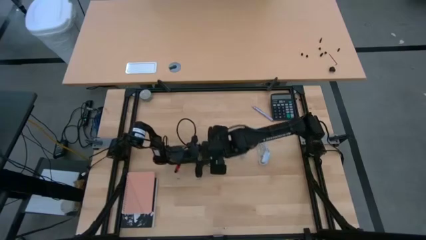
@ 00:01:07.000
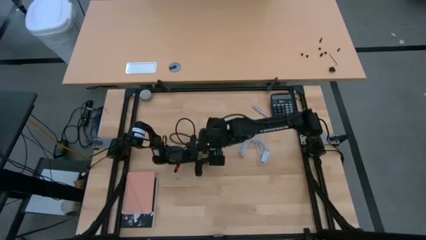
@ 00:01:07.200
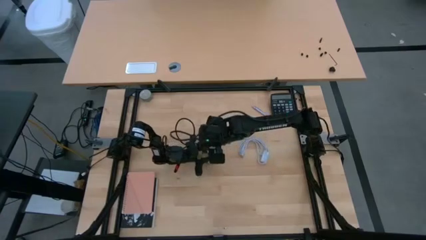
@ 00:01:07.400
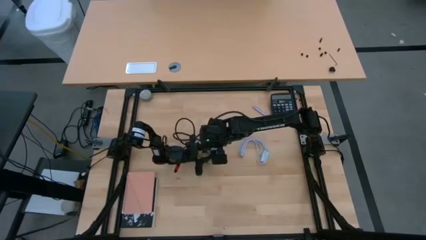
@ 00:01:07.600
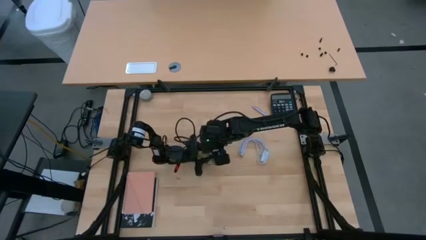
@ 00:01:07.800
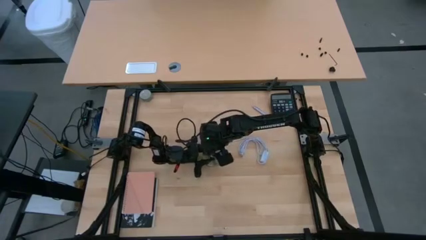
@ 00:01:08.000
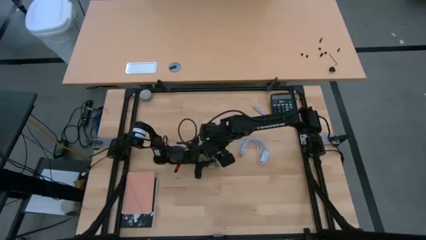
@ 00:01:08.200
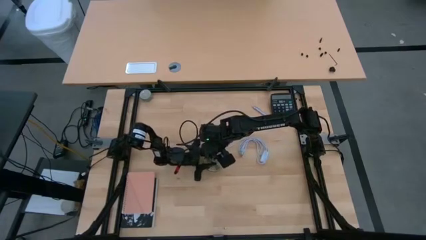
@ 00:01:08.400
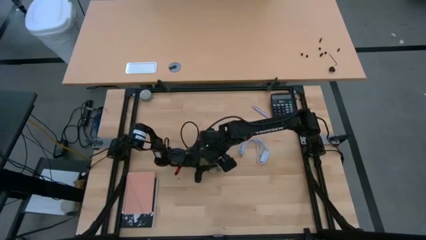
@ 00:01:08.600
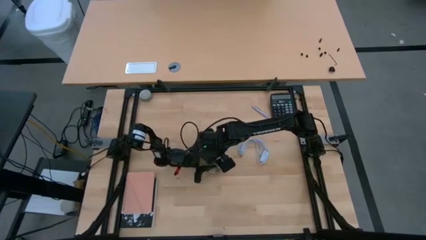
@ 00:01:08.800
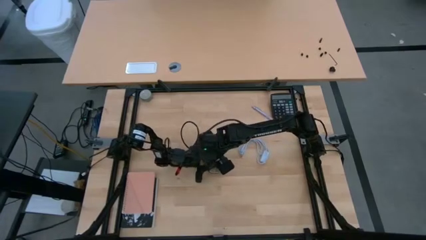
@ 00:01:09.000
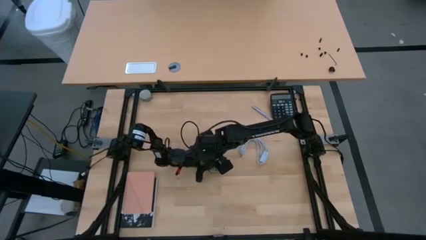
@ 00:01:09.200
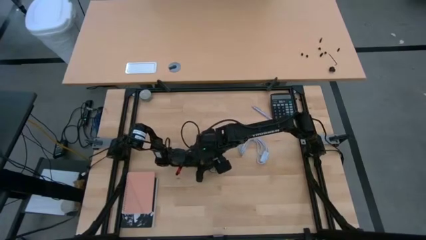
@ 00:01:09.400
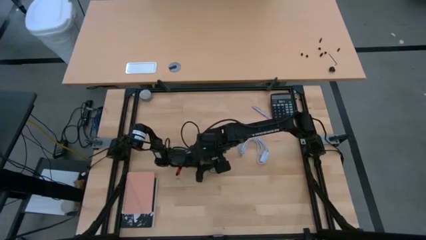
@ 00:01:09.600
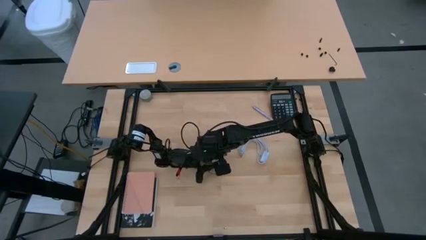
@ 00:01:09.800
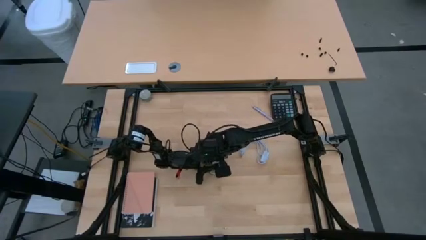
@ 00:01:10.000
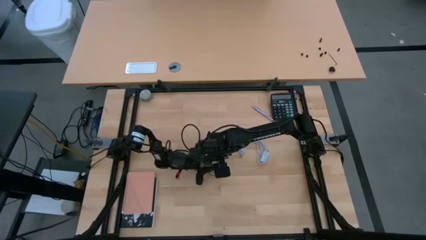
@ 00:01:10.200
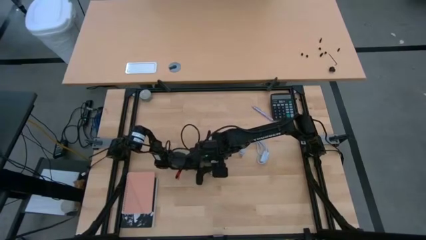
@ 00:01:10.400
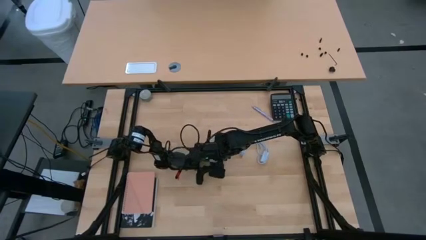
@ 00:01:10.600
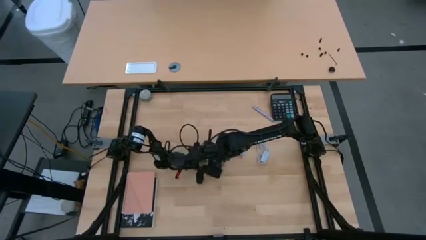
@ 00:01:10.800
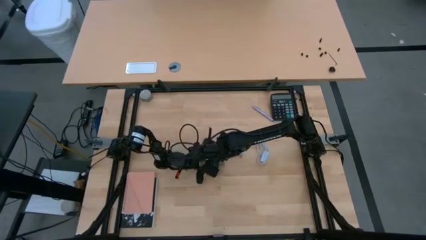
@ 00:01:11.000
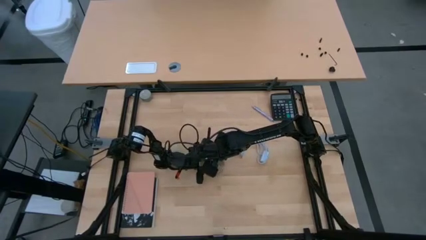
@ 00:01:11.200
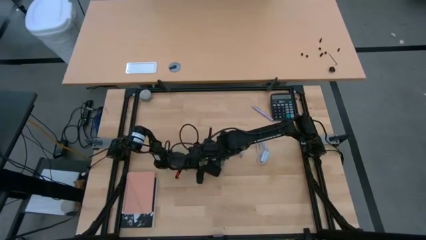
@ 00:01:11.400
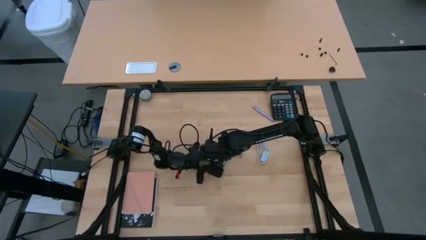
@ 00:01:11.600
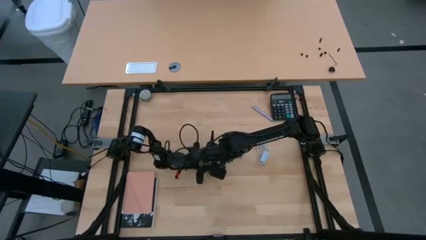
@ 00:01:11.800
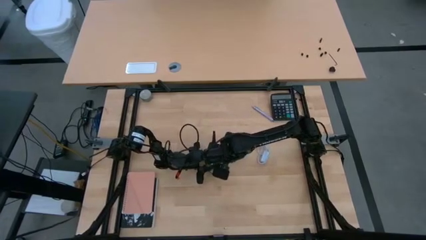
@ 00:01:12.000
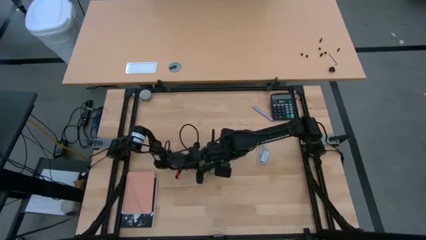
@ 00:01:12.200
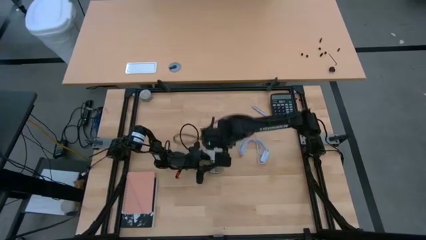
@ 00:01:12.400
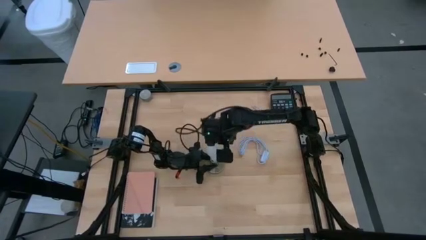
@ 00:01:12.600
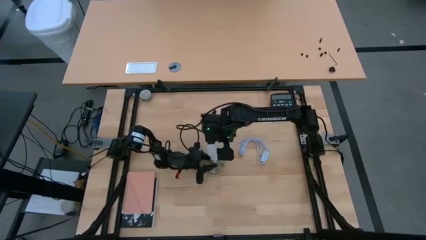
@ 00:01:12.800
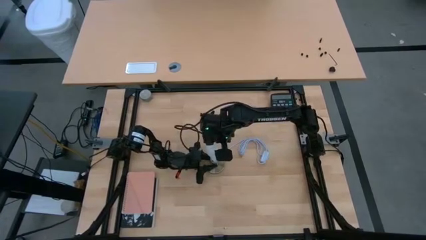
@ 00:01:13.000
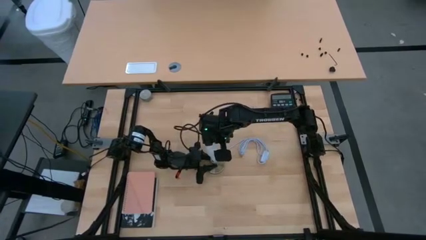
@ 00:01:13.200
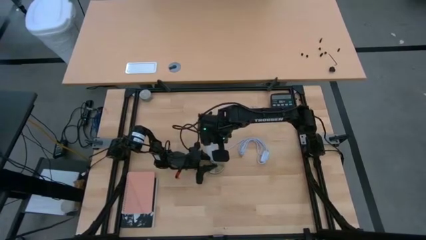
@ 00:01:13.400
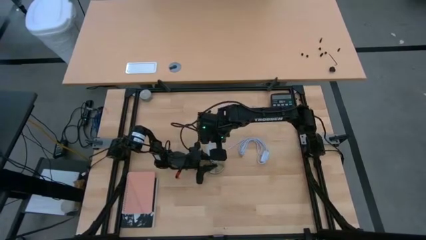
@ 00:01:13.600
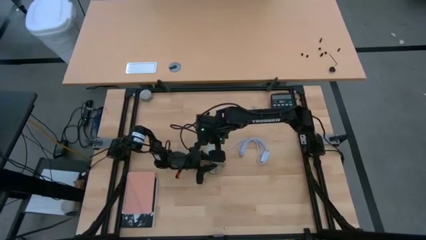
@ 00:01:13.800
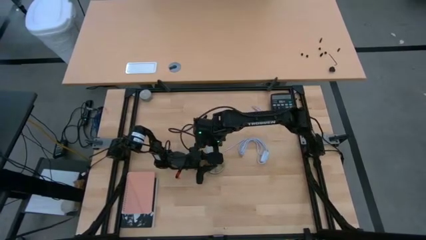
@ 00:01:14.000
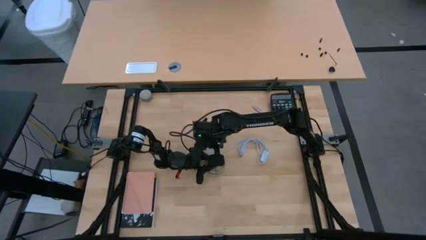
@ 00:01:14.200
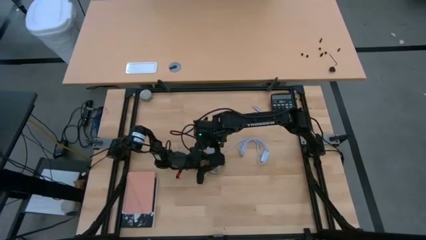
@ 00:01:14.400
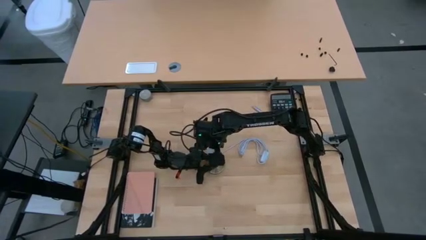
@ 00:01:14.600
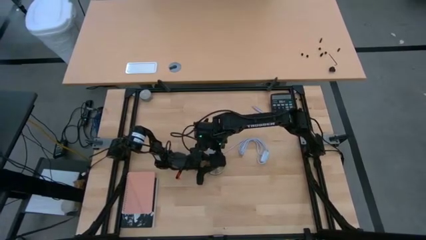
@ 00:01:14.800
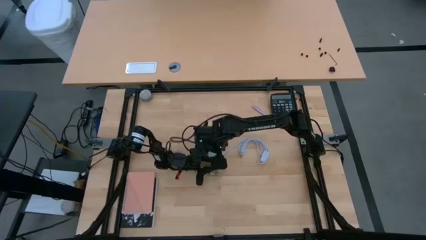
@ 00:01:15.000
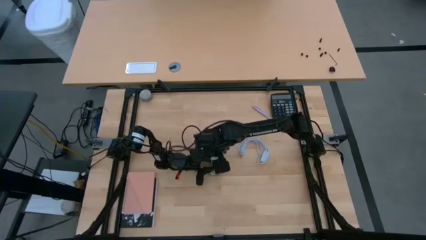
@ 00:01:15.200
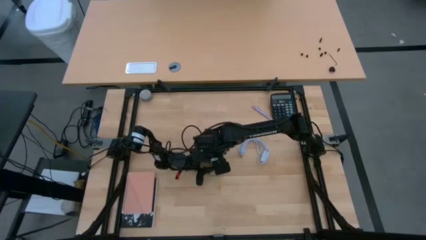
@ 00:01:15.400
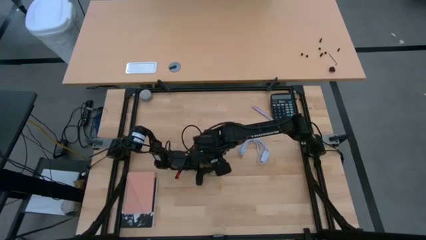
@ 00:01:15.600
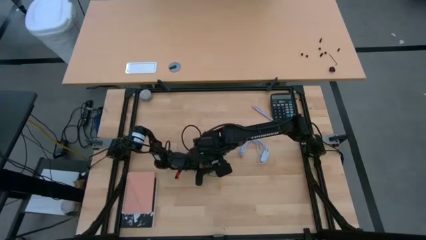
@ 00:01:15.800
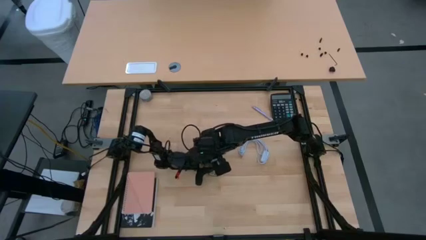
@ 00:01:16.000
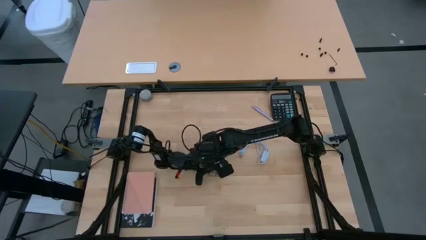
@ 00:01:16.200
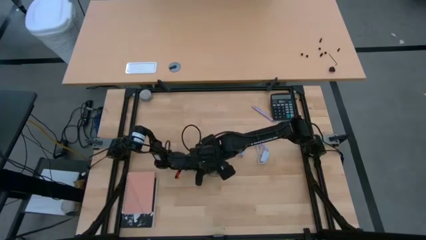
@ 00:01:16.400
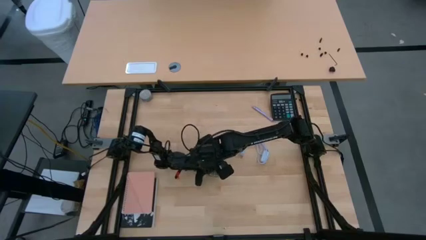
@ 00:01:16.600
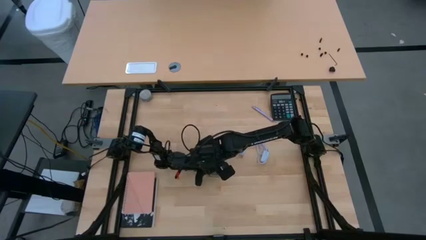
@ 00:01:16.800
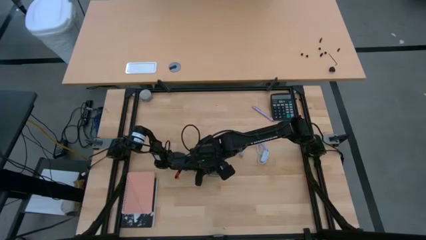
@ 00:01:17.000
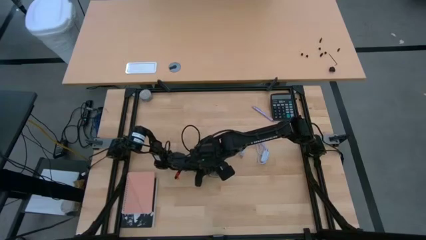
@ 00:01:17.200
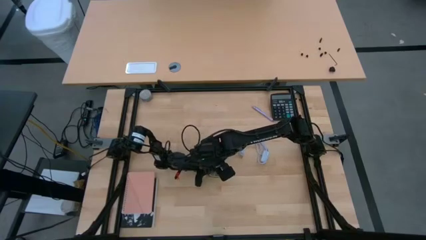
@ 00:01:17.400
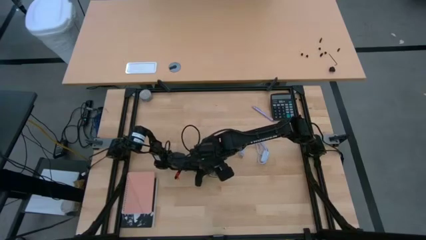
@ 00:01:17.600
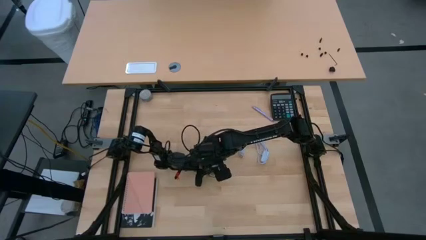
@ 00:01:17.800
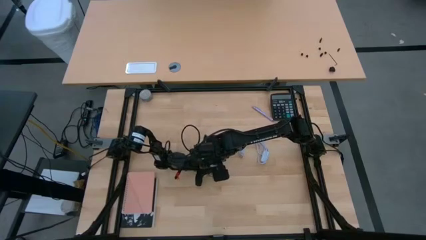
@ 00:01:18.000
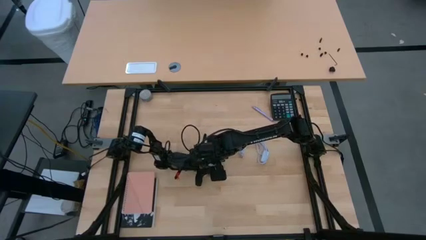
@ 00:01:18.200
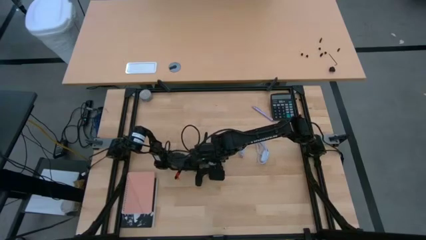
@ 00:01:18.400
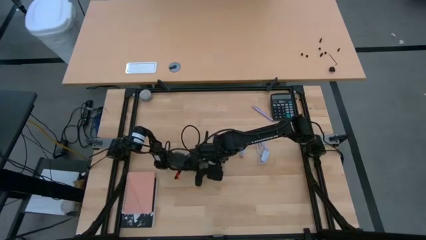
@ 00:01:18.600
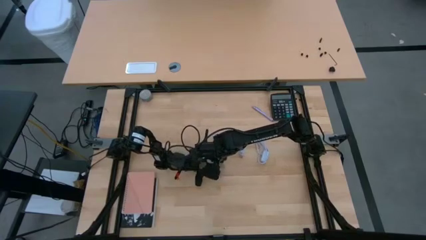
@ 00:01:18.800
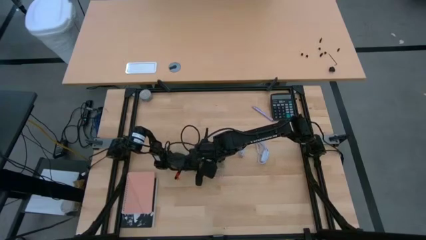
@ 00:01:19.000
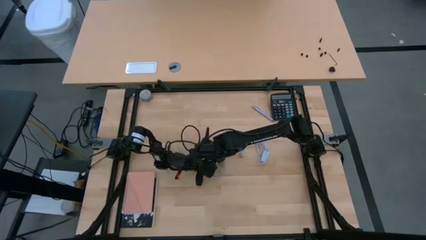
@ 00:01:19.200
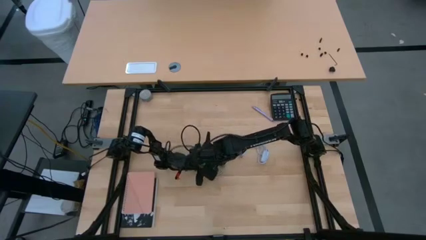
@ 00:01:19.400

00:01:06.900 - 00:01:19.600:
Task: Screw lightbulb
Insert the lightbulb on the lamp
